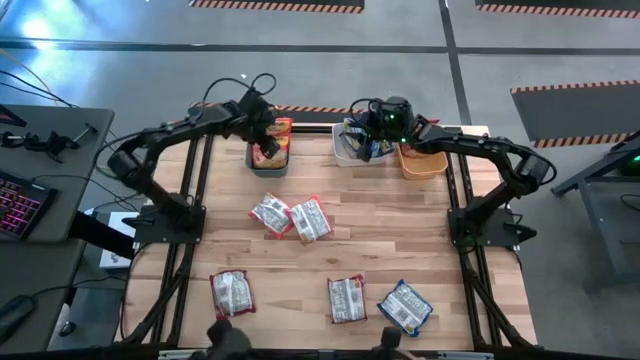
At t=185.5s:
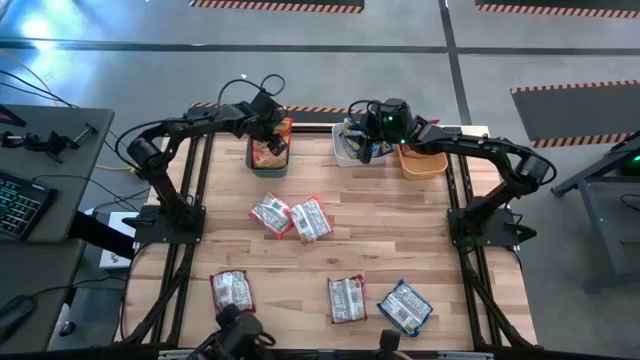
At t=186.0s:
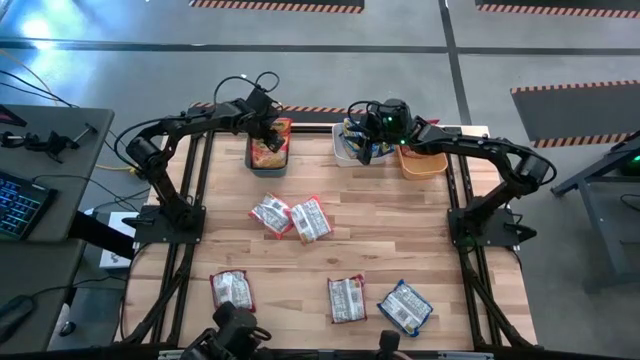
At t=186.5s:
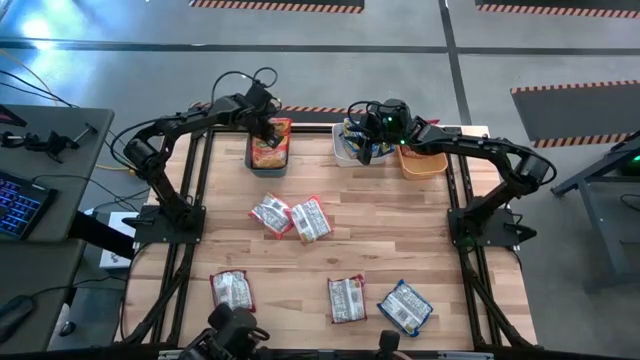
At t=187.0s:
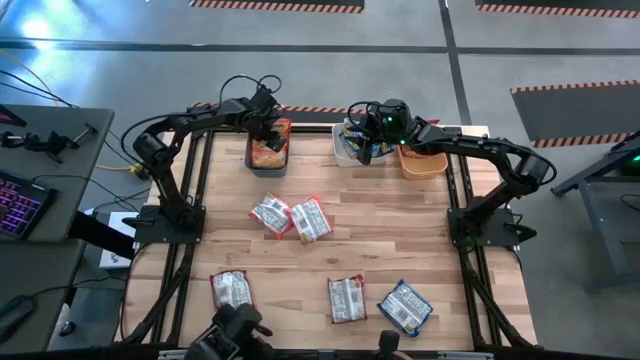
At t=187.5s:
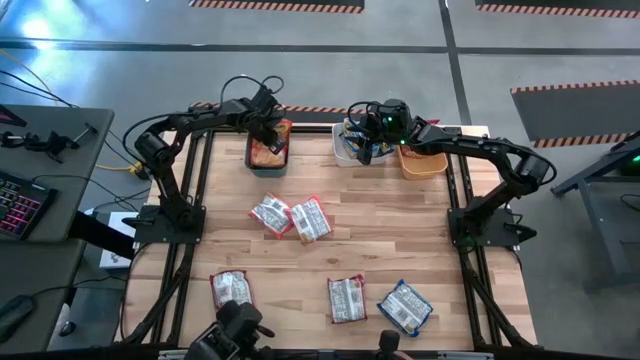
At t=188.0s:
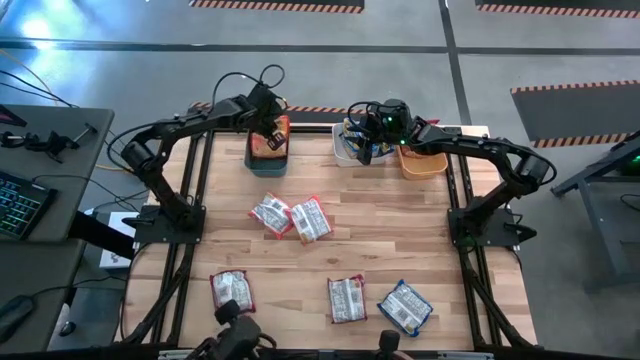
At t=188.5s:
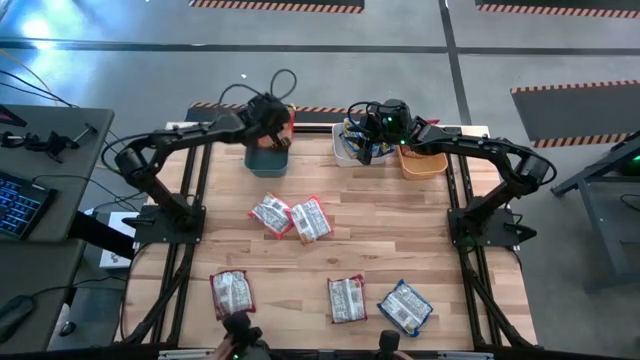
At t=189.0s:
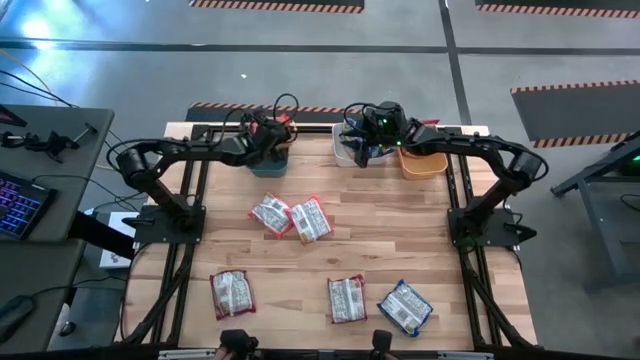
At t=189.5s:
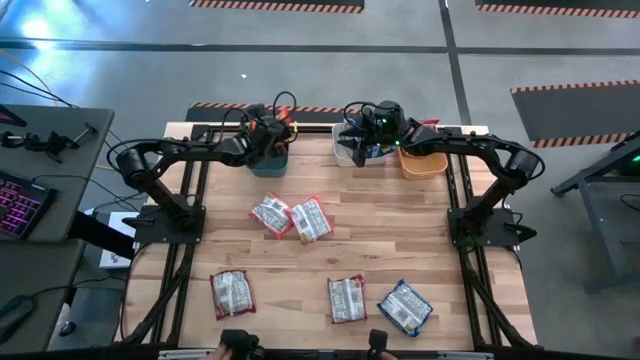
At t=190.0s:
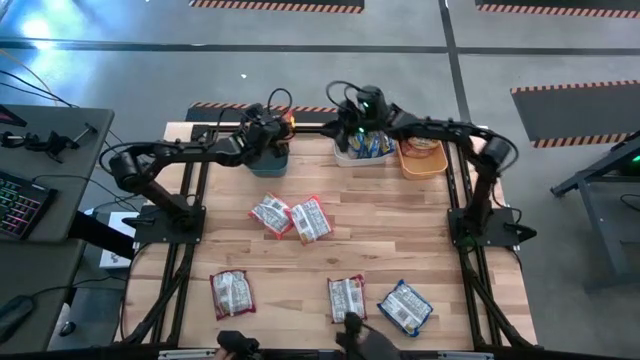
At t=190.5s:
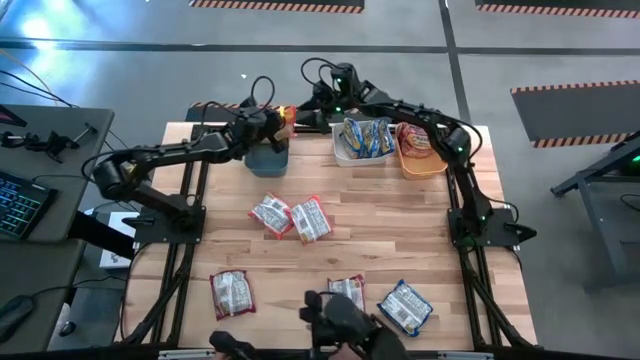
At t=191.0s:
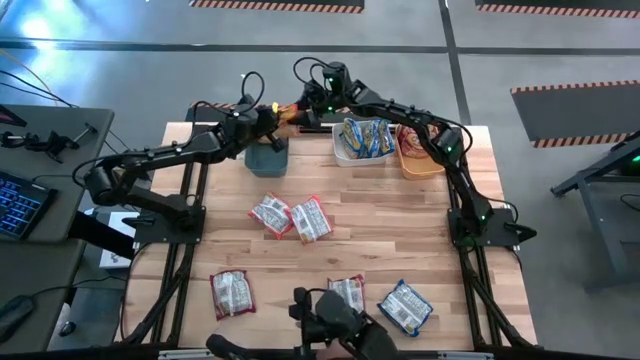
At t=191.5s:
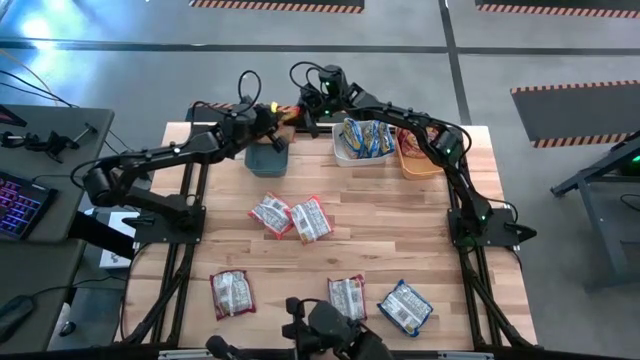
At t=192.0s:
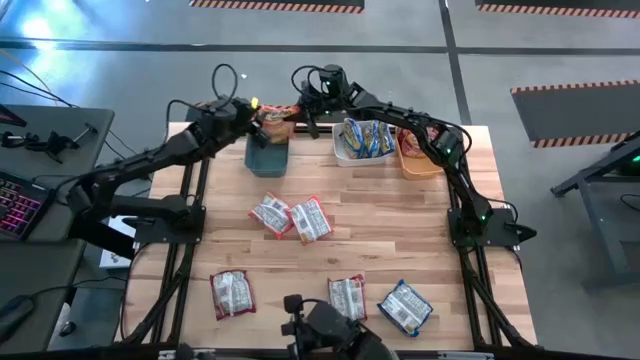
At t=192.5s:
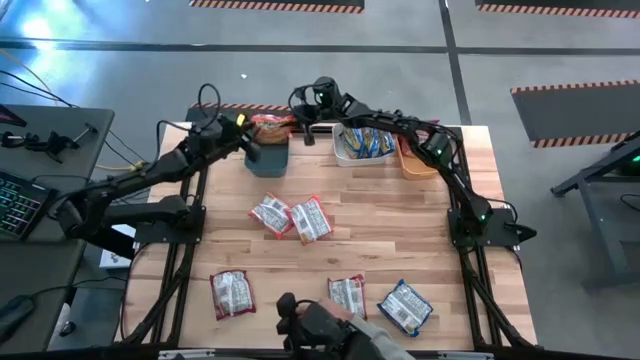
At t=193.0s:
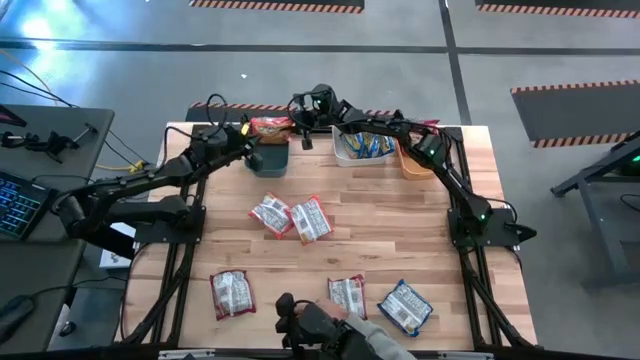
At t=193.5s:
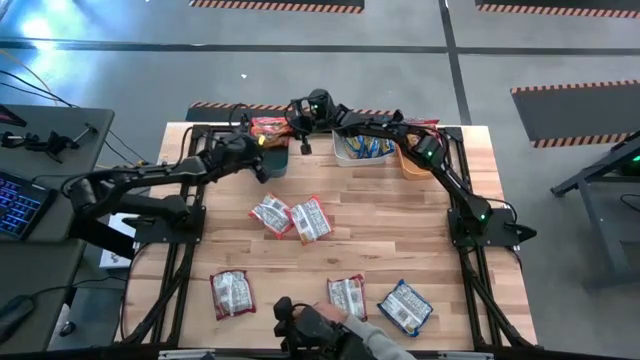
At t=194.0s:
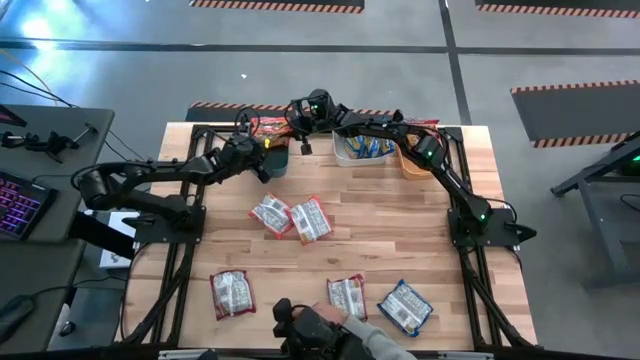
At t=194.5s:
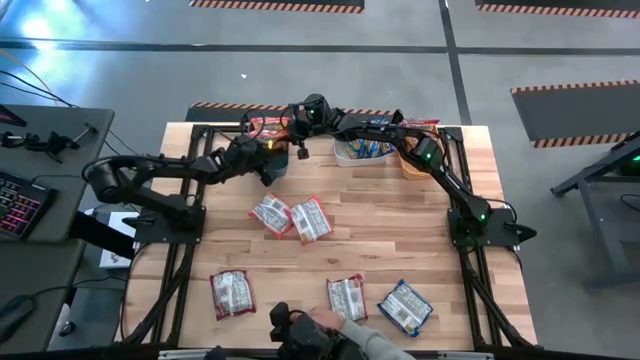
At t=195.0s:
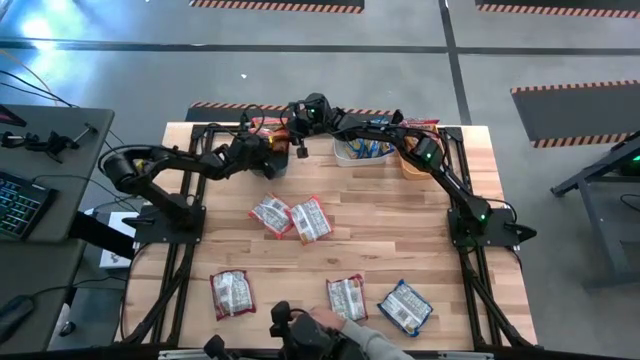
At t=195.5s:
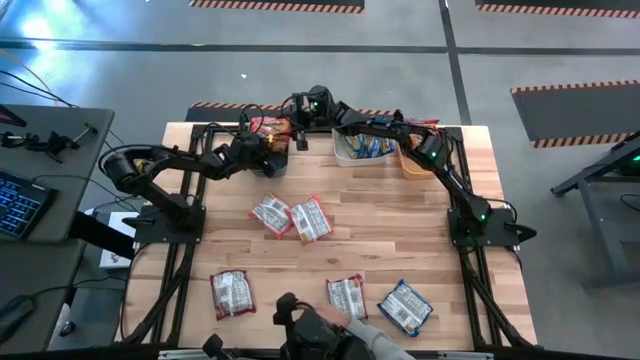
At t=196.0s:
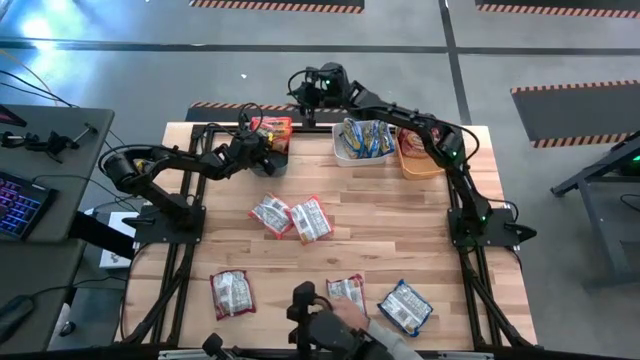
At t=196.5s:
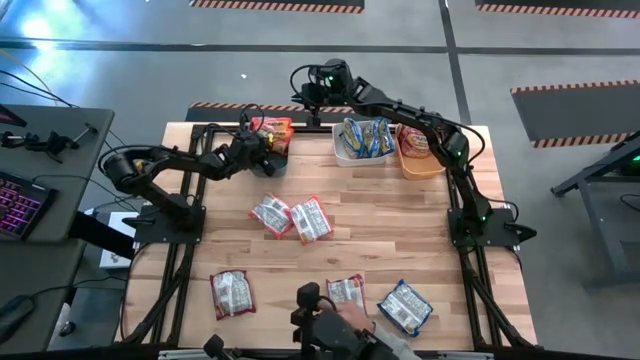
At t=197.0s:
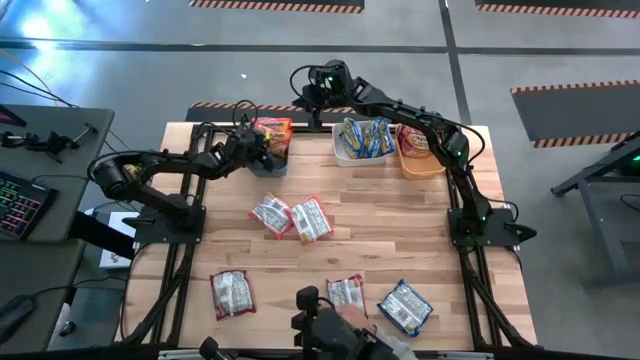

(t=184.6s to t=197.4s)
Task: Sort Maruchan noodles
Adjust the orange noodle pack in the green bin

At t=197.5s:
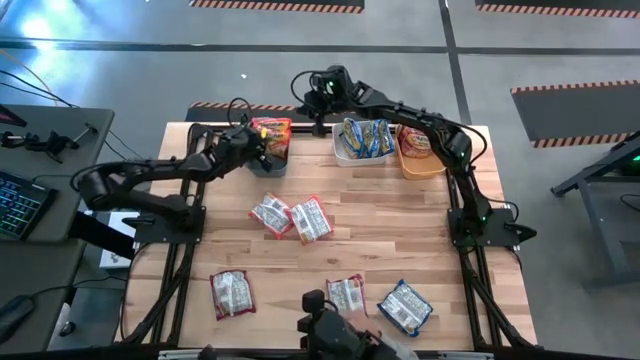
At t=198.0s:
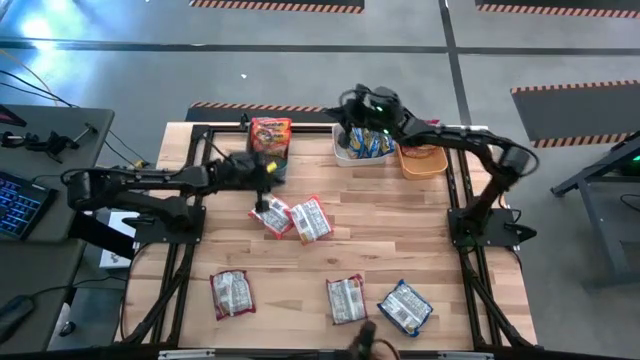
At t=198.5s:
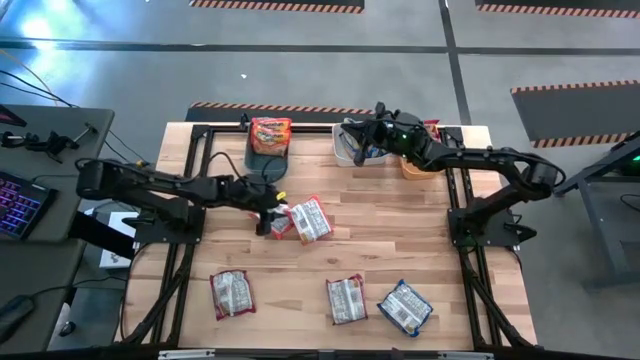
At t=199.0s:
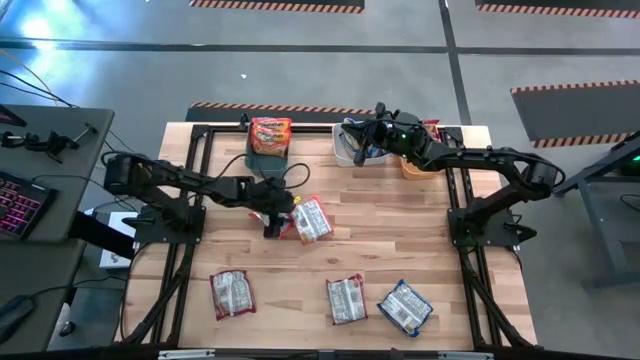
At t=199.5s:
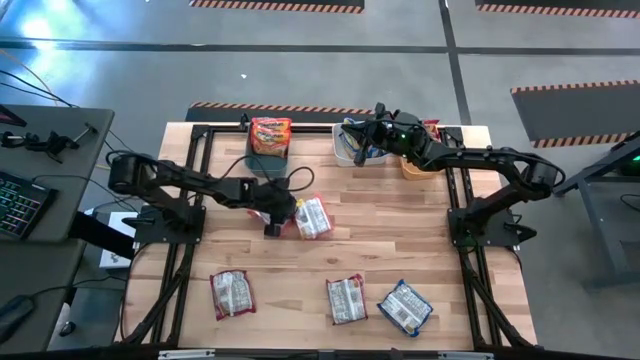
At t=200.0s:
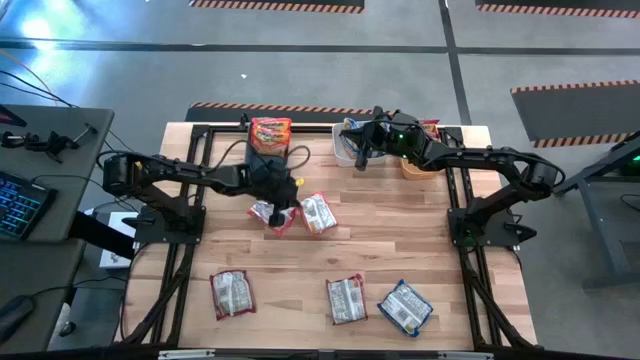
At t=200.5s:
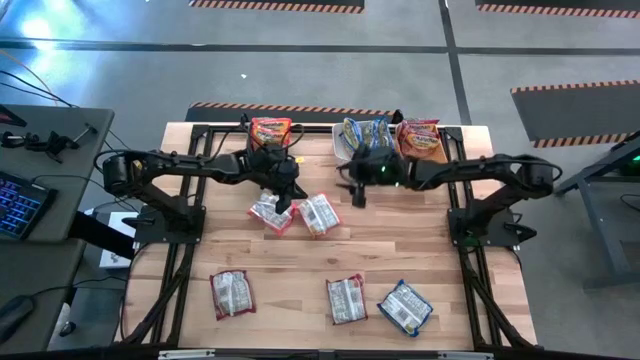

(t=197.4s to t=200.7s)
Put the right orange noodle pack into the blue bin

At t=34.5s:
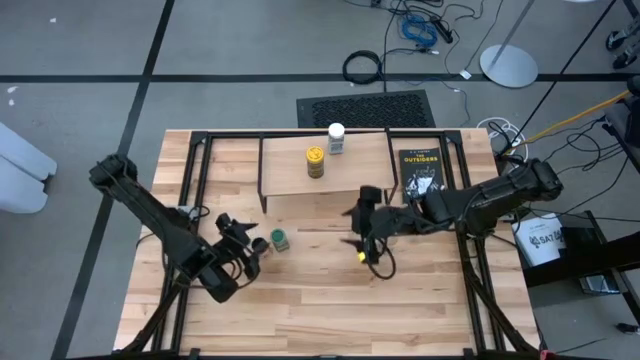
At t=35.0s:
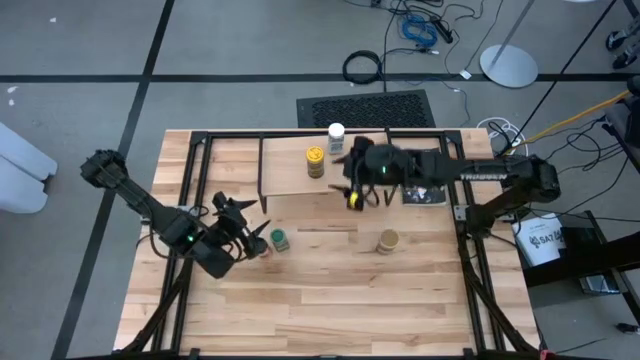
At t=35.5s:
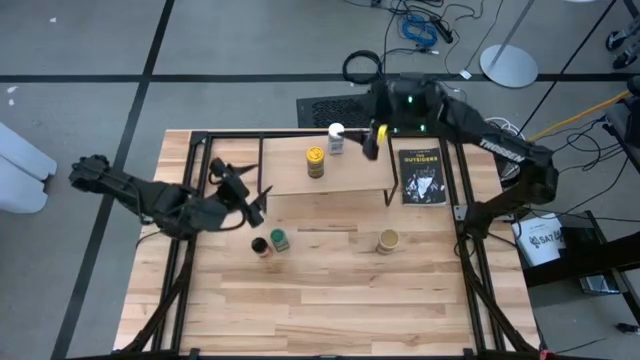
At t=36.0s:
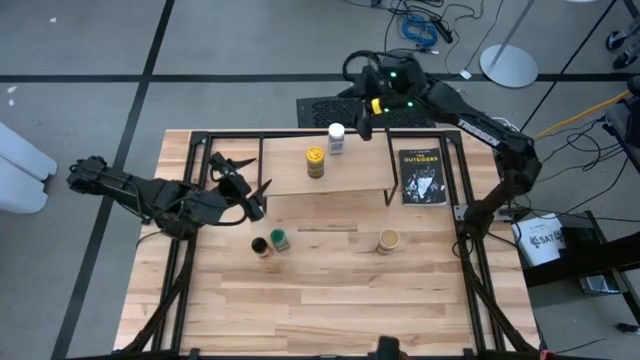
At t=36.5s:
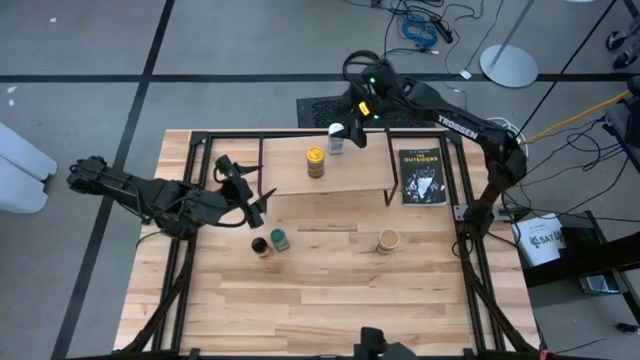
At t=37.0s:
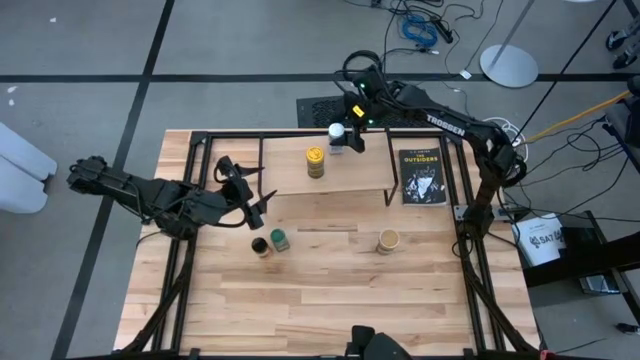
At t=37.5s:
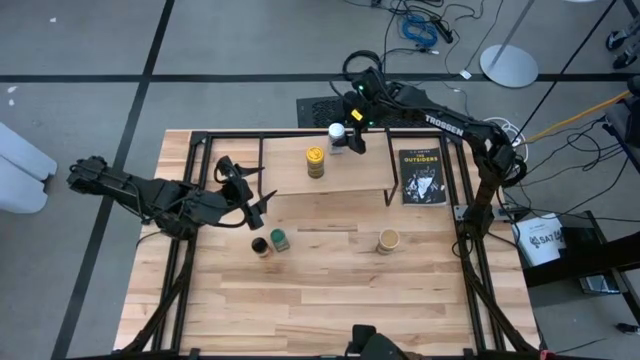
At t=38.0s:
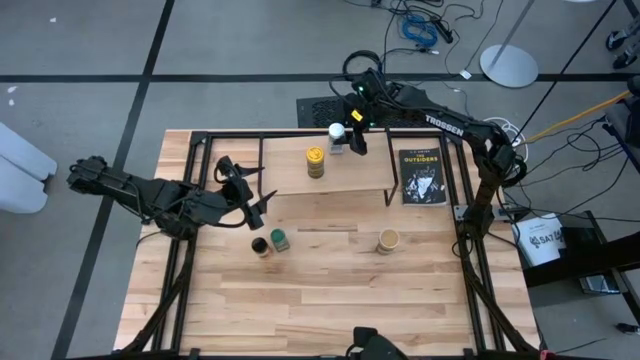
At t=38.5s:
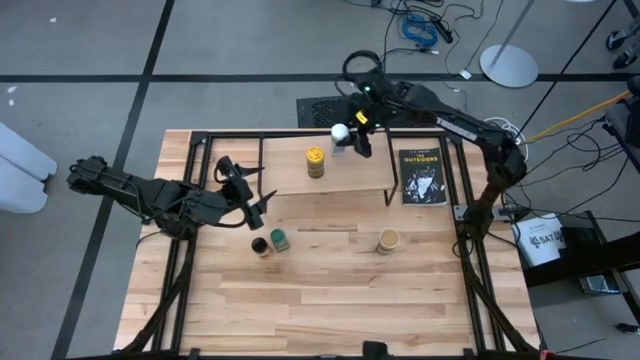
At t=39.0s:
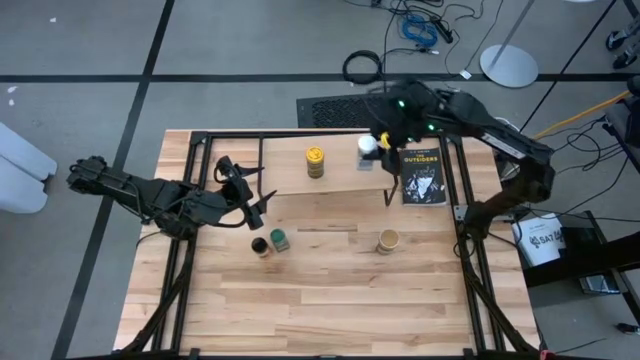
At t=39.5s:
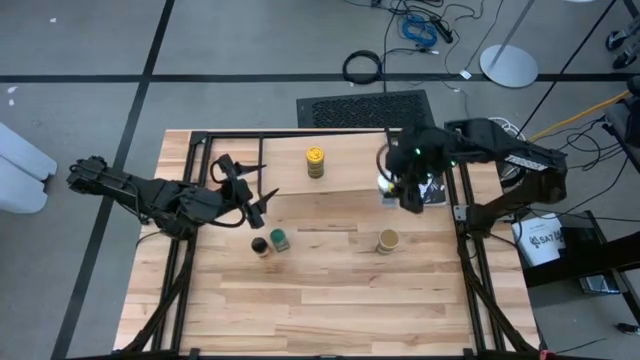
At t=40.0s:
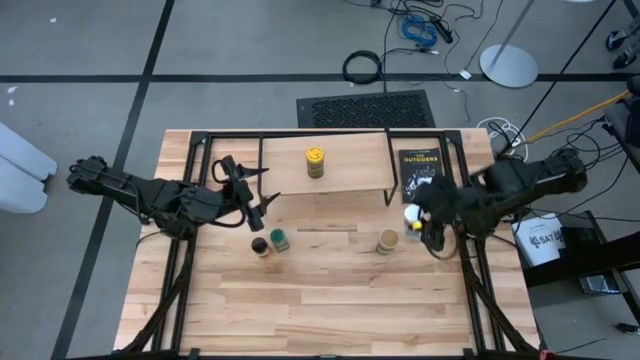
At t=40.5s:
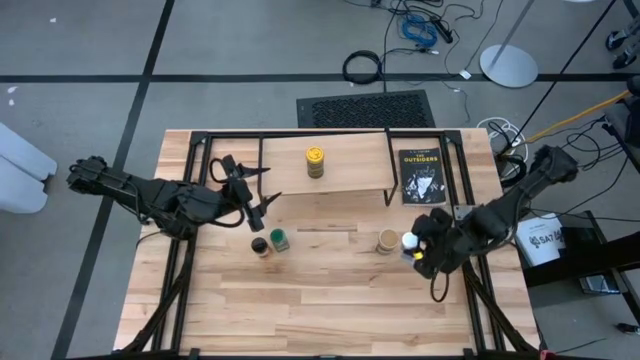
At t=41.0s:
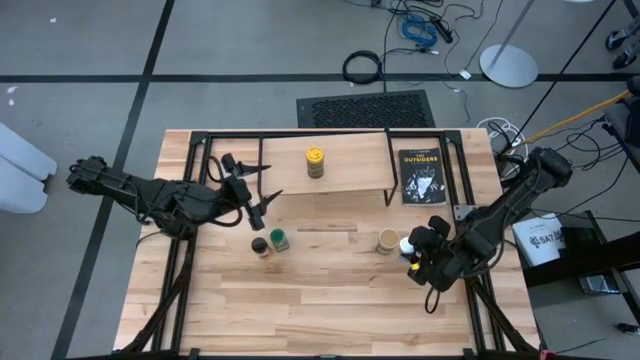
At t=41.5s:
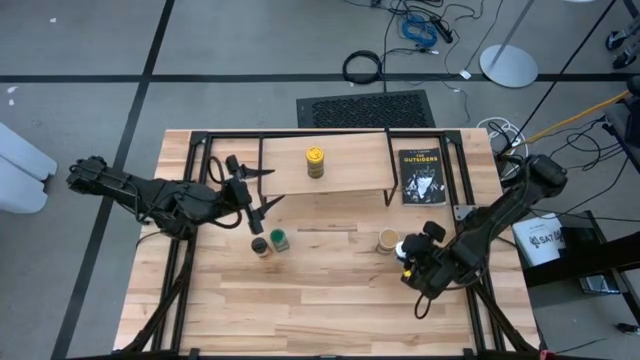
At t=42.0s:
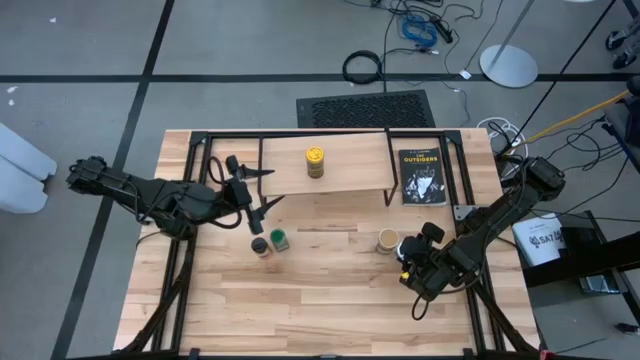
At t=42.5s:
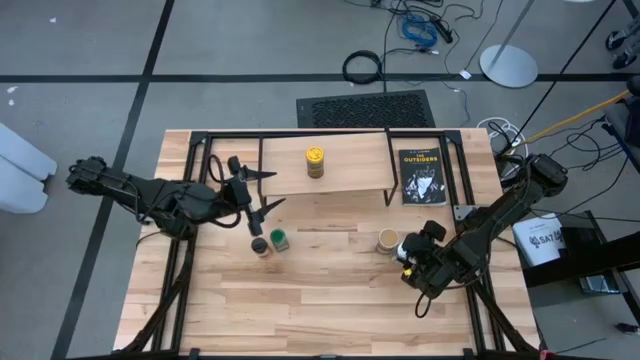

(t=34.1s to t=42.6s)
Task: Shelf spices
Remove the white seasoning bottle from the shelf
